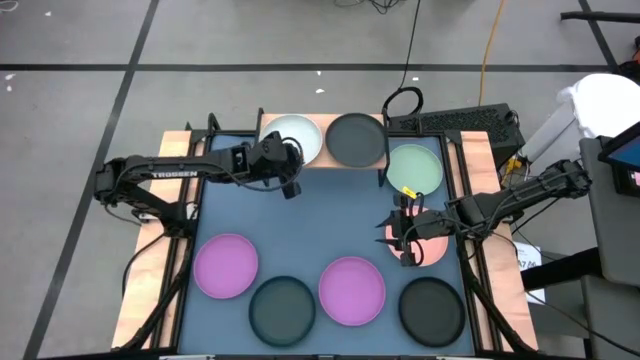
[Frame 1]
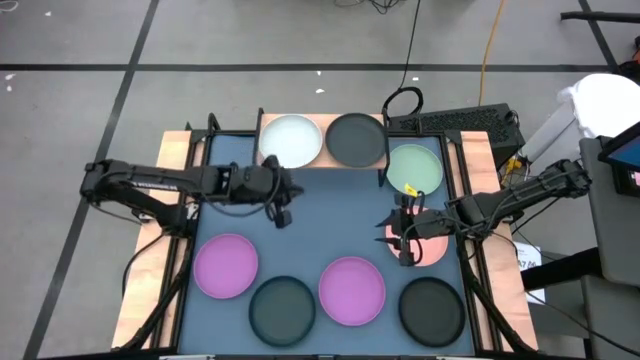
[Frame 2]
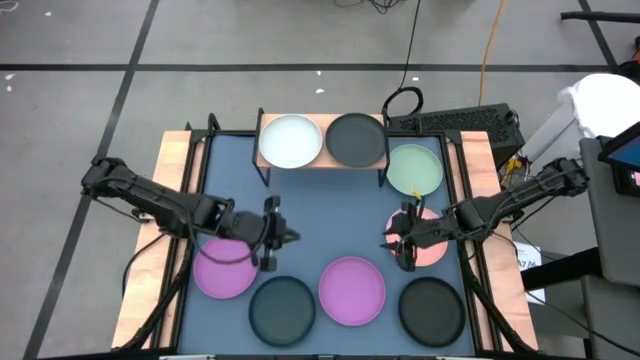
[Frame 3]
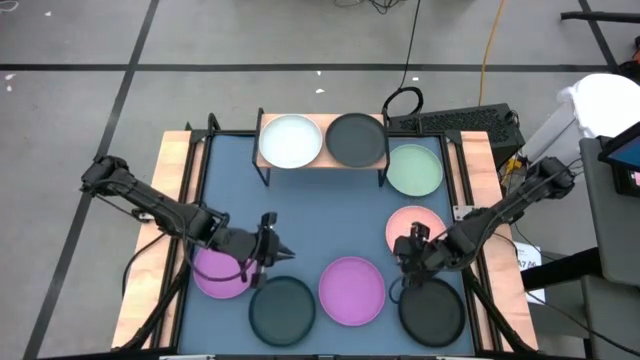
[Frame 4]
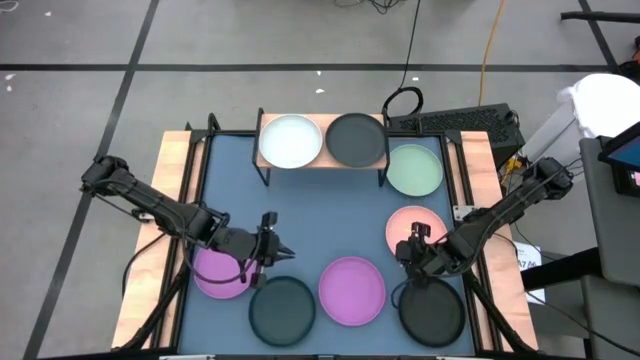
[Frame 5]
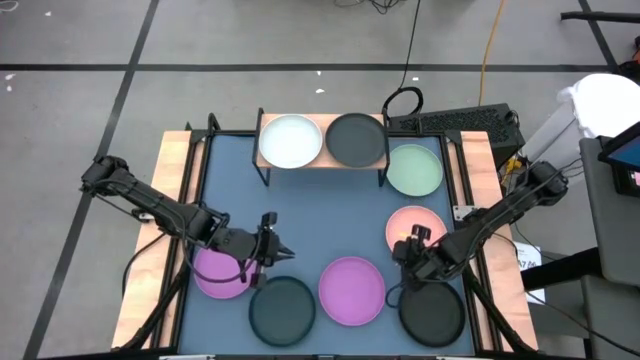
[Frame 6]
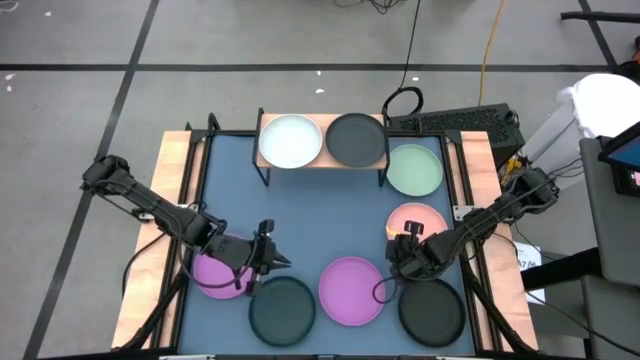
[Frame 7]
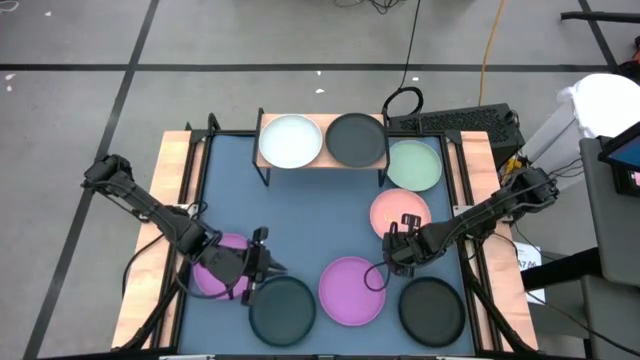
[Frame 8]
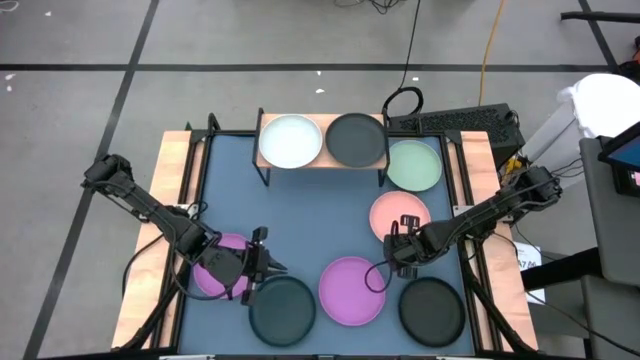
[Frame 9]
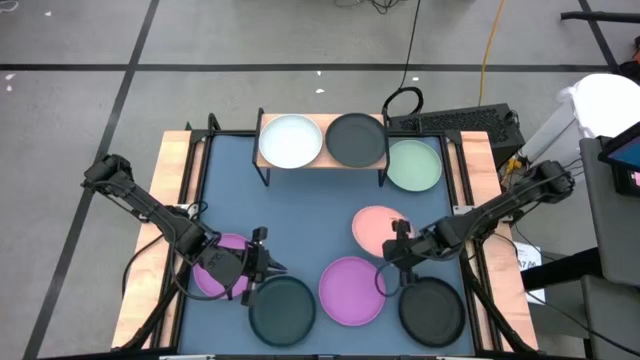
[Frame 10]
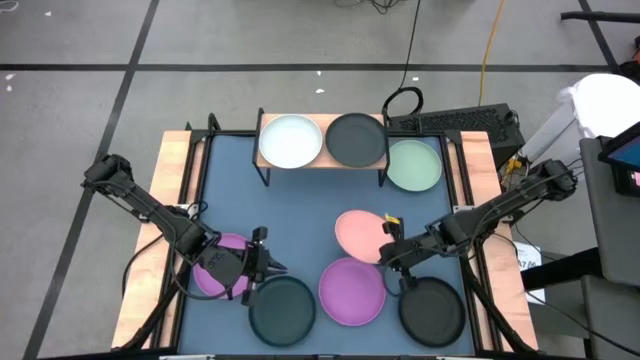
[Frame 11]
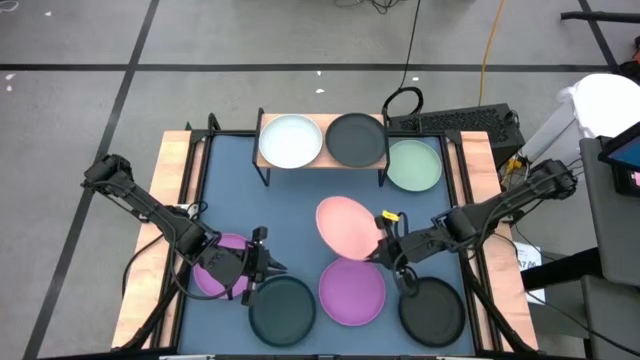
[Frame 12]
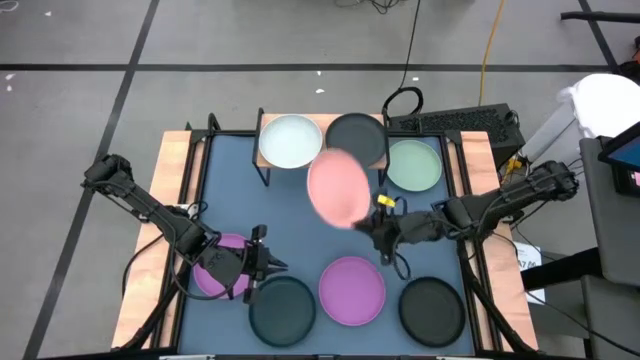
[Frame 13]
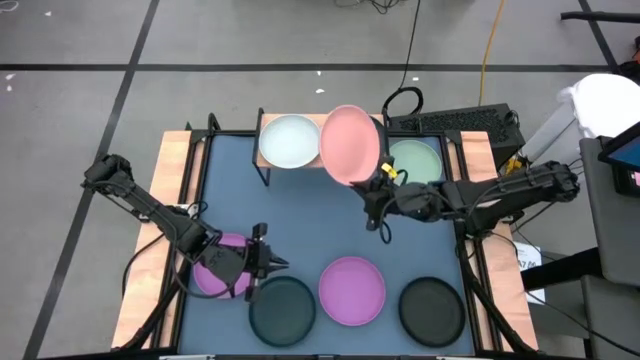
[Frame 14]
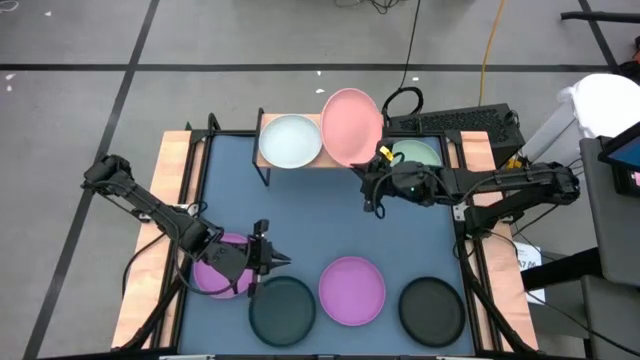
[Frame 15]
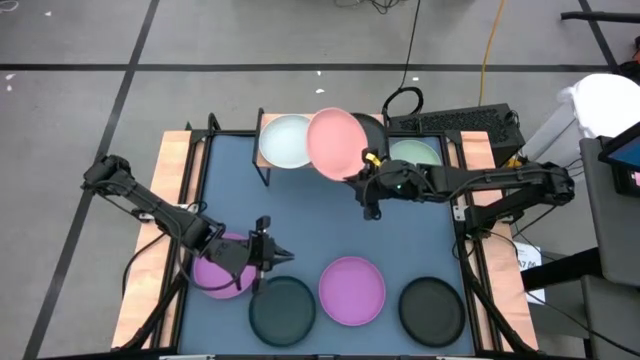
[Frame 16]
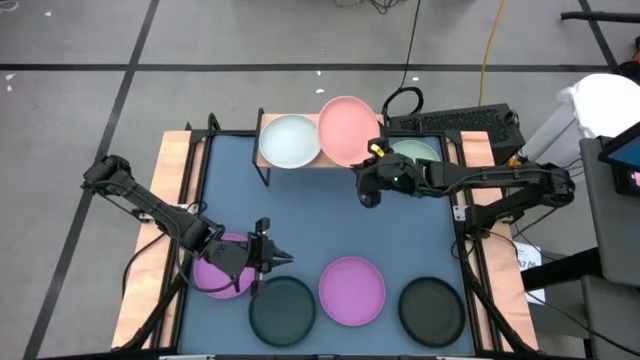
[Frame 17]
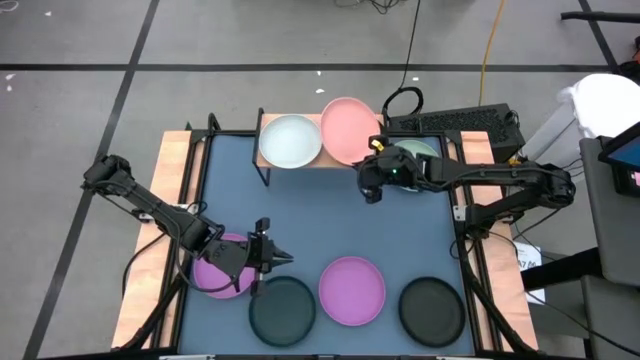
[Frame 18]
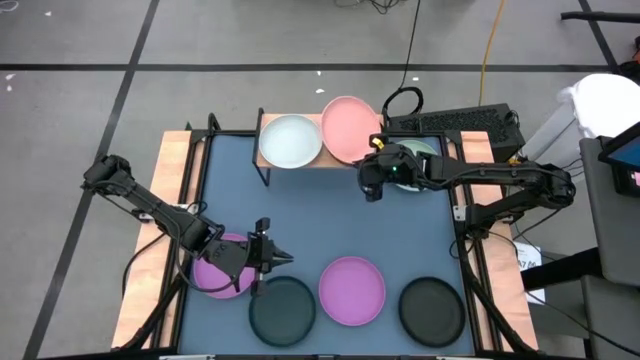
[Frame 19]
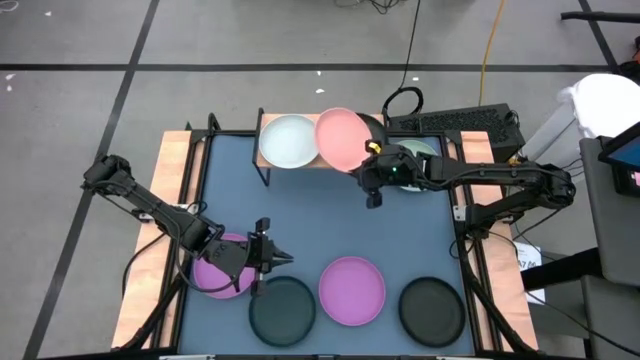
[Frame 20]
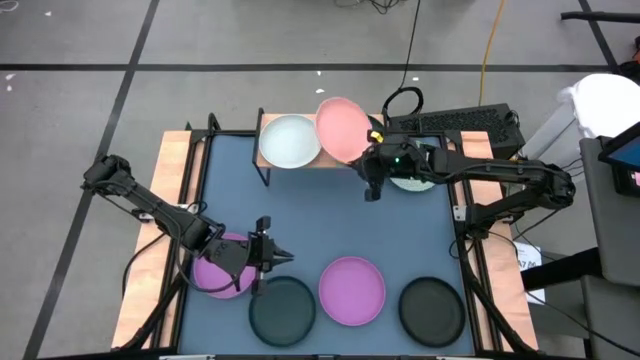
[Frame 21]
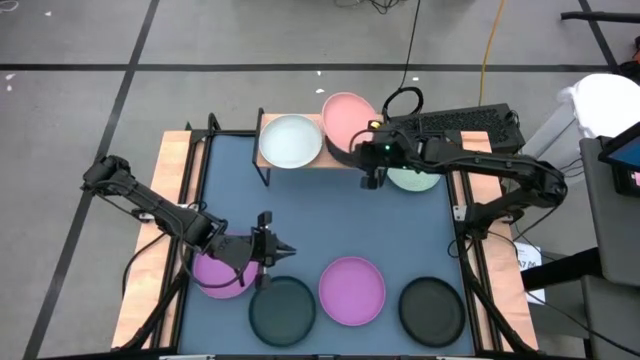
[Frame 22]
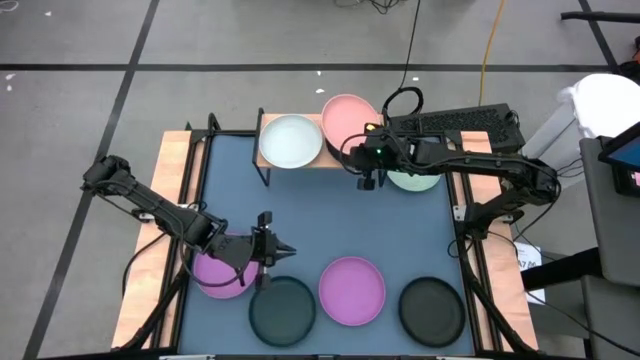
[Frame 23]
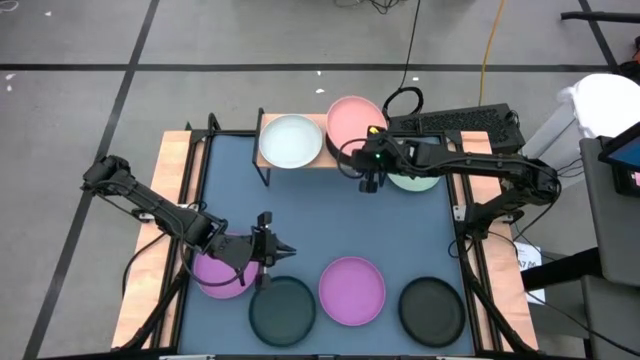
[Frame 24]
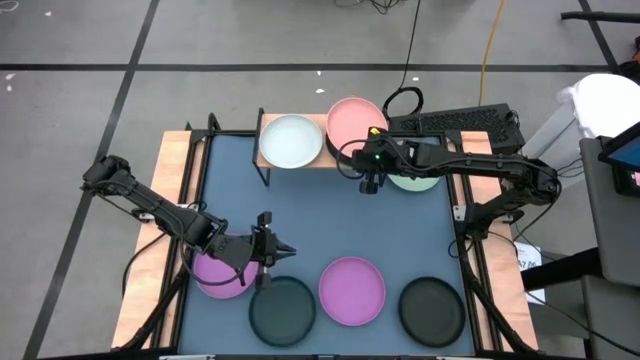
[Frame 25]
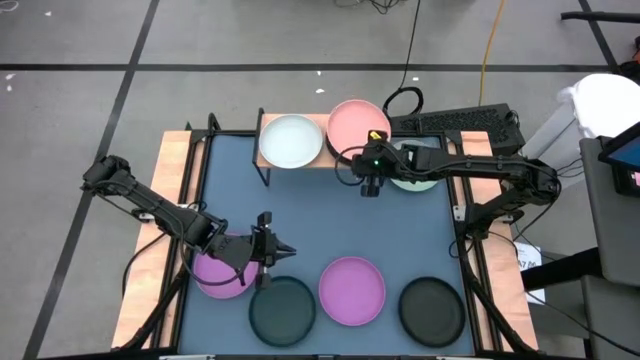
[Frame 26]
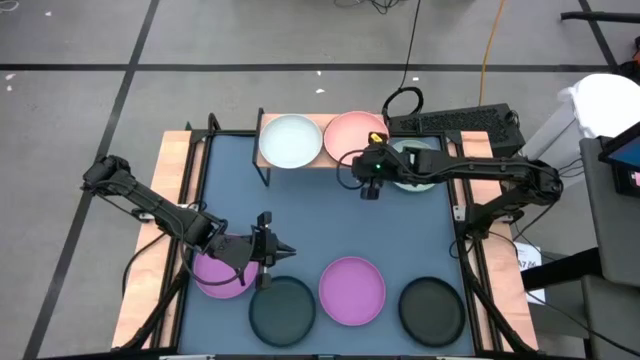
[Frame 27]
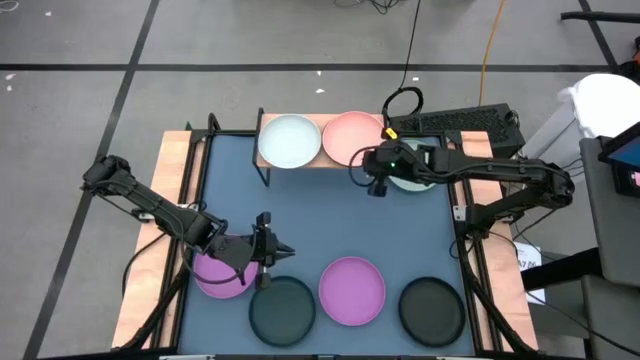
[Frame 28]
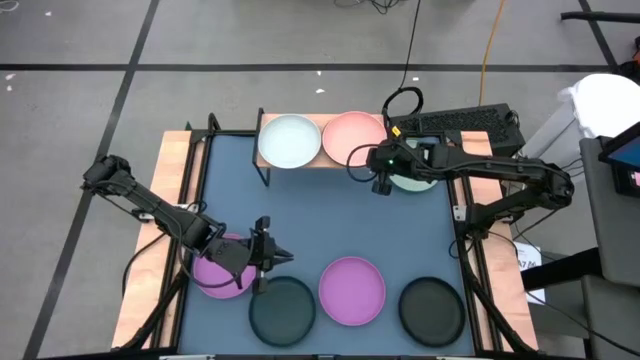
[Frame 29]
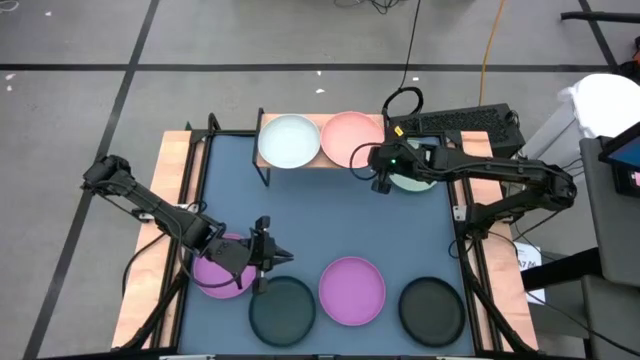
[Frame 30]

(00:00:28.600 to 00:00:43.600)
Task: Place and stack plates onto a shelf
Stack the orange plate on top of the black plate on the shelf
